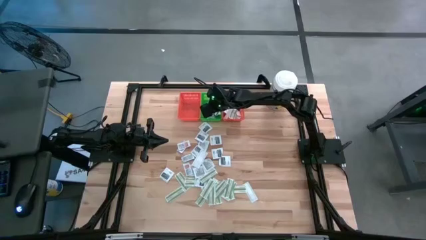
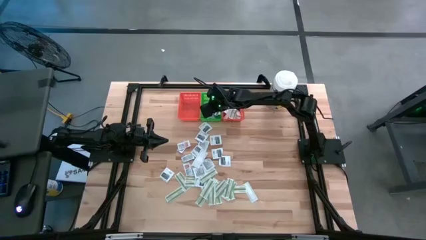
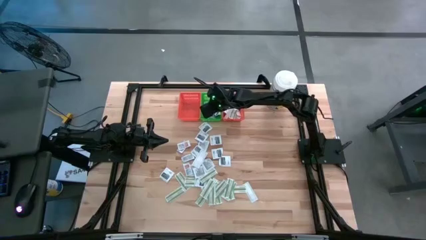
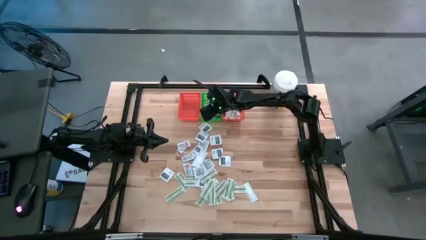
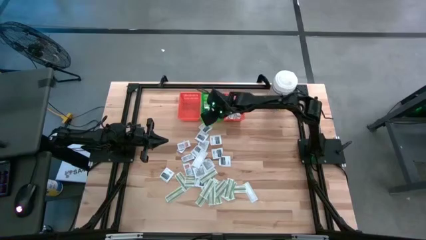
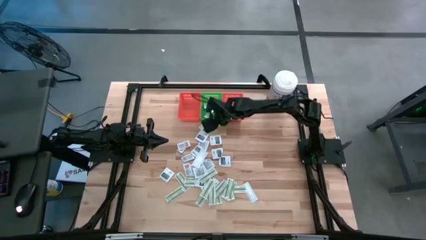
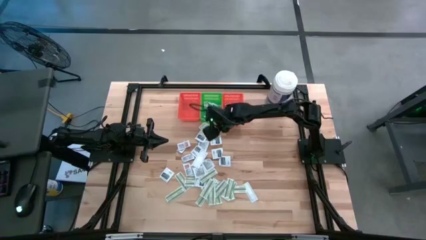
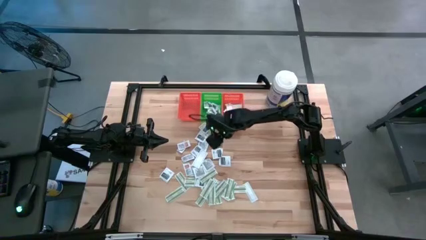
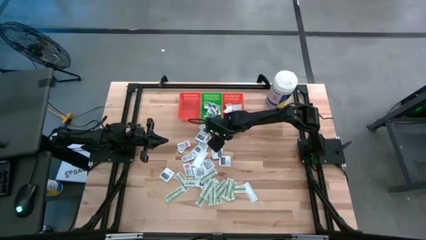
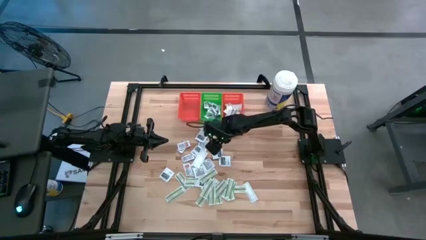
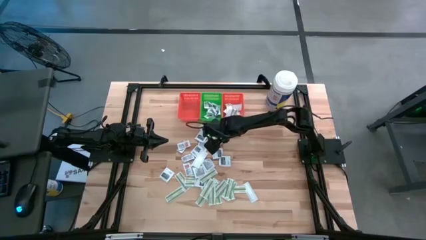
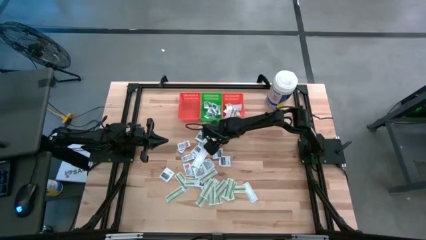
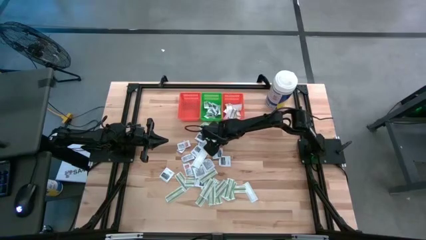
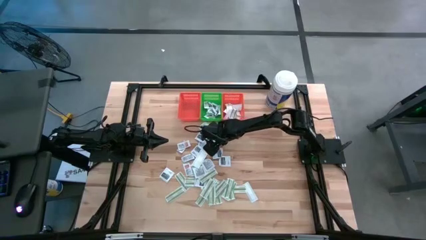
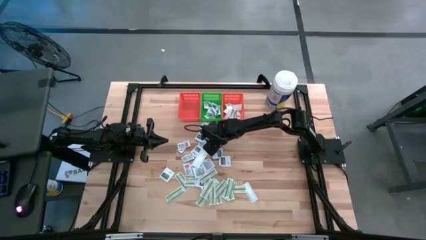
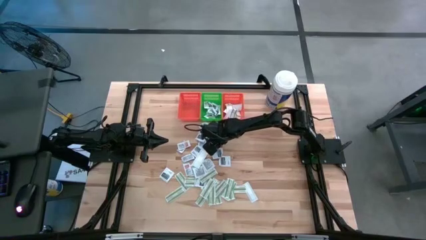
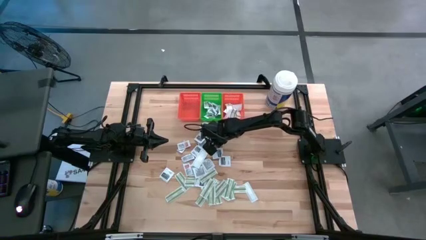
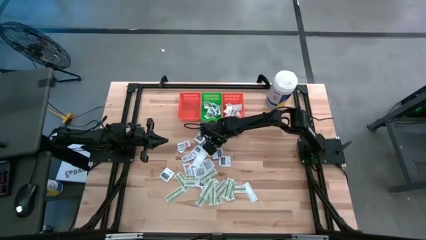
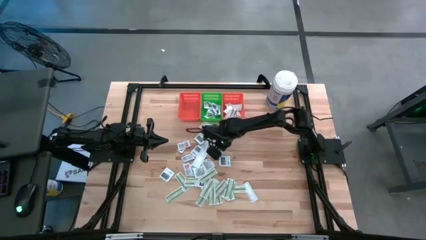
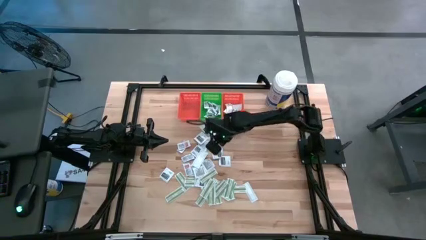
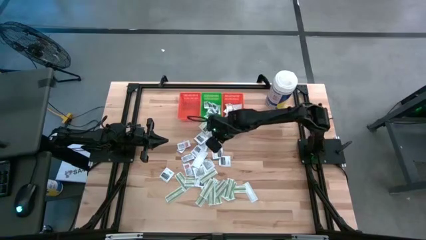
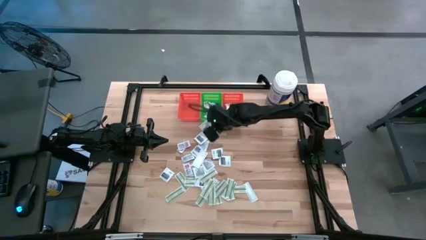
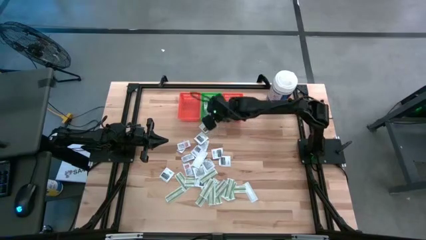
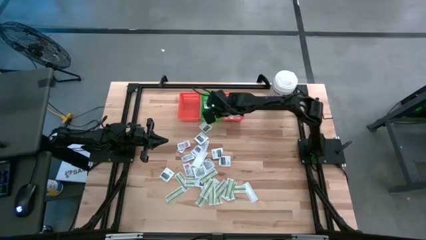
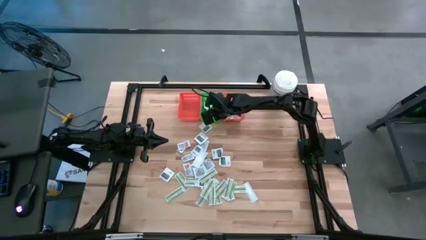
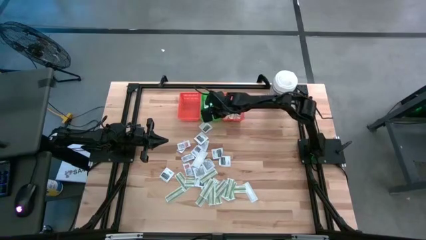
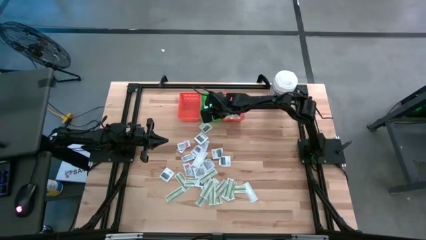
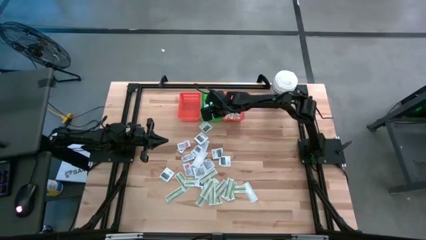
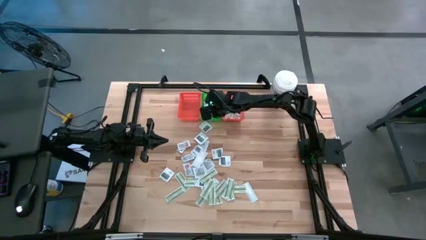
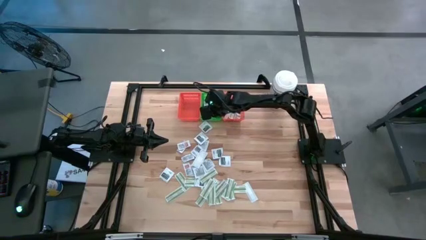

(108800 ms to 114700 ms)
Task: Pick & Place First Aid Supplies
Put the towelette pack into the green bin

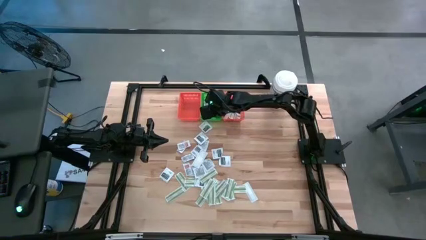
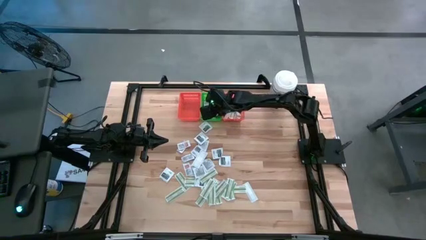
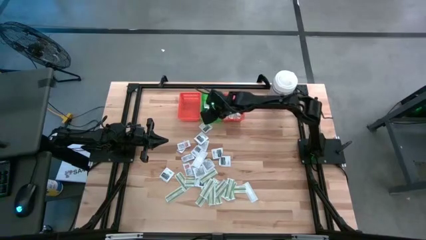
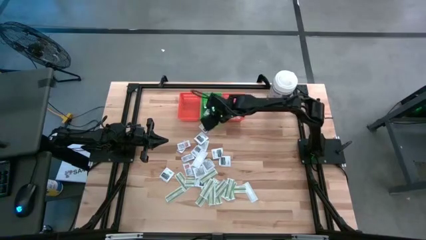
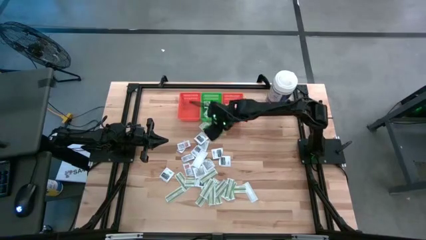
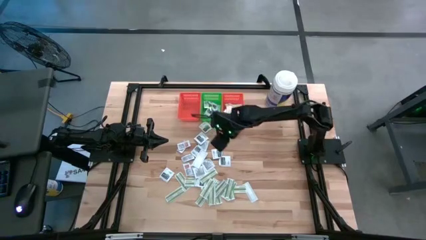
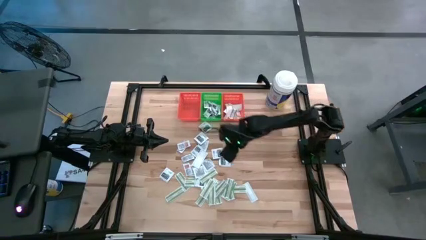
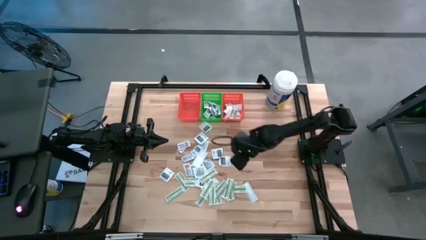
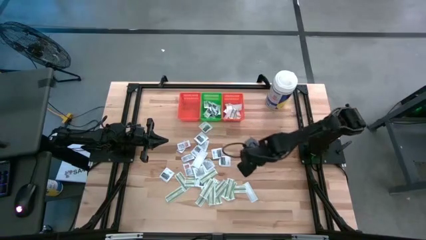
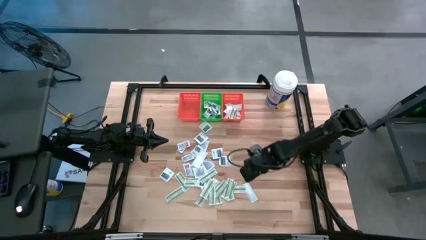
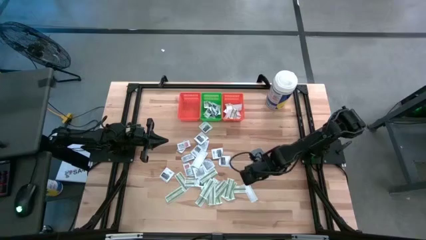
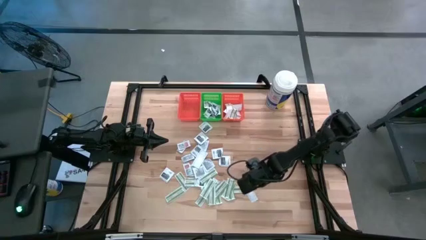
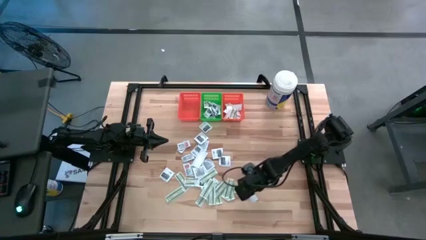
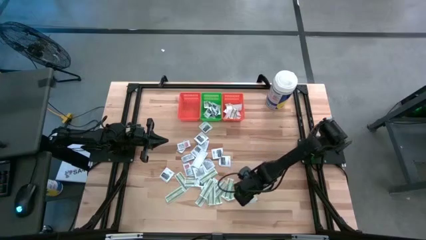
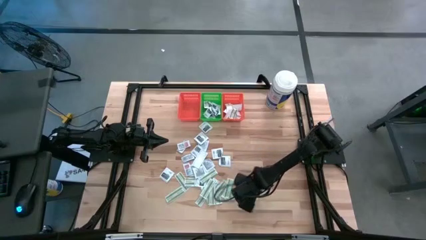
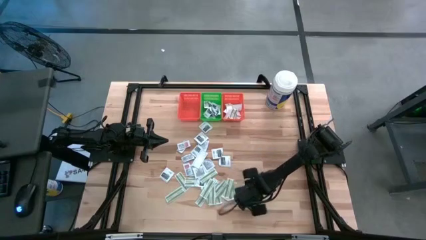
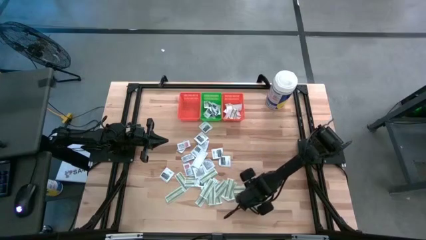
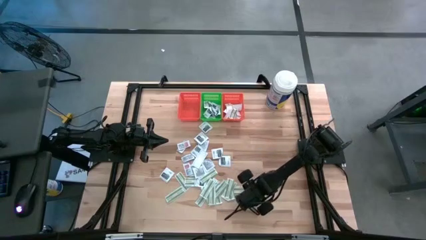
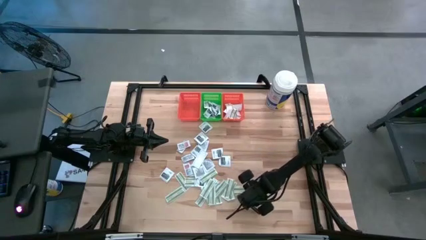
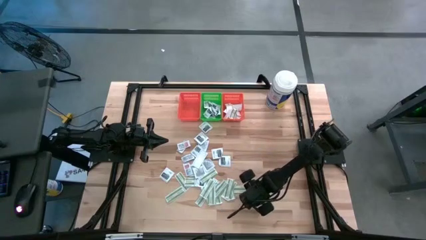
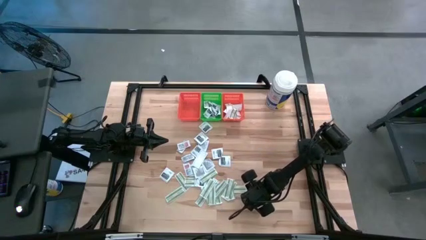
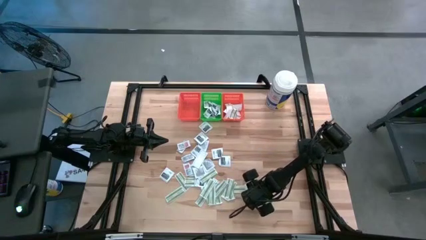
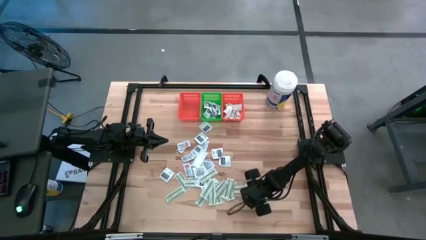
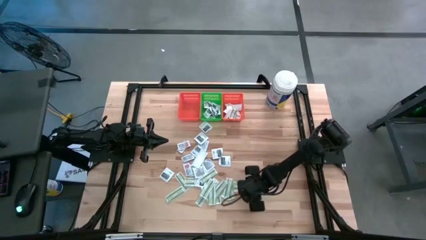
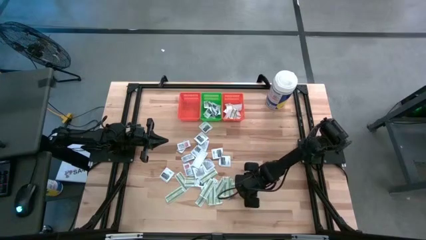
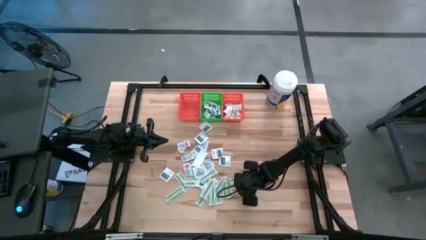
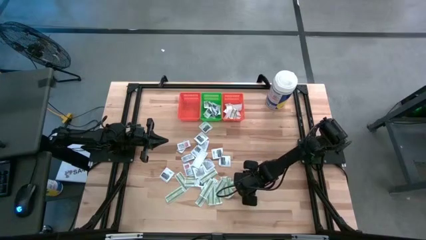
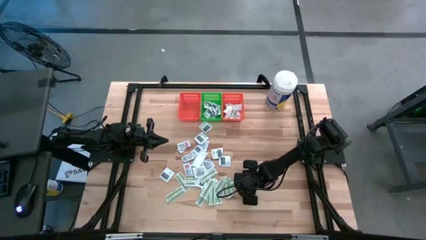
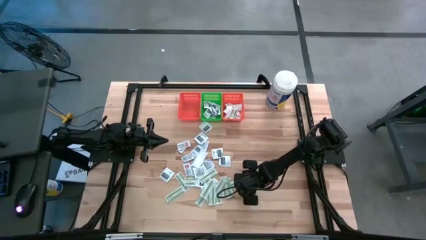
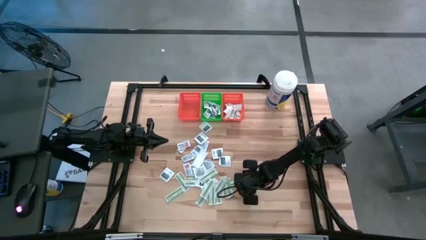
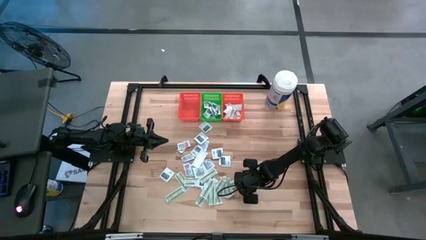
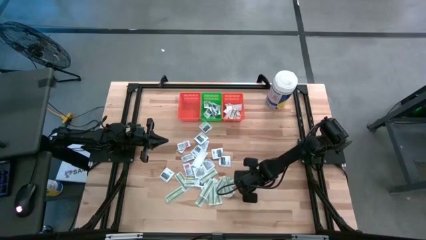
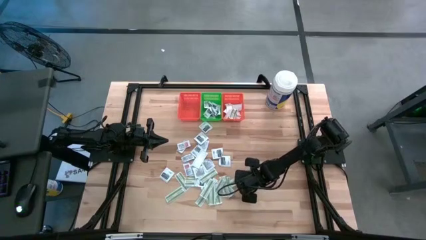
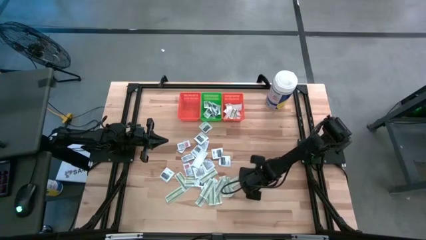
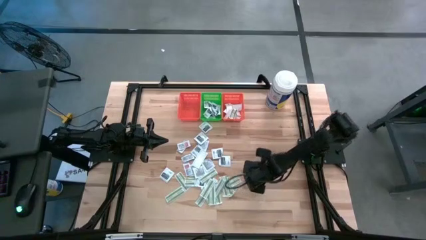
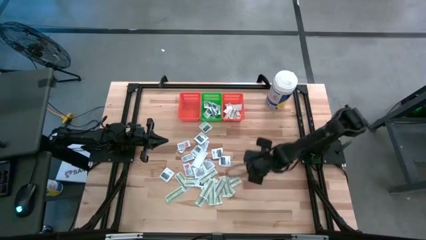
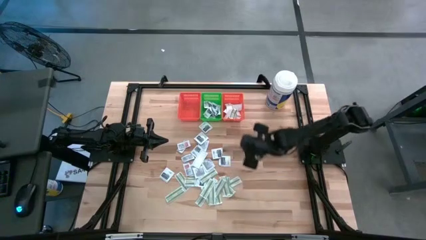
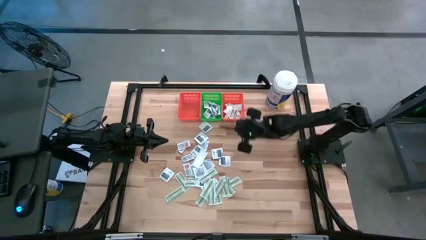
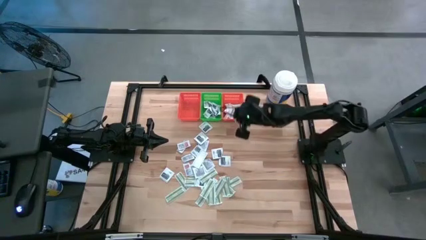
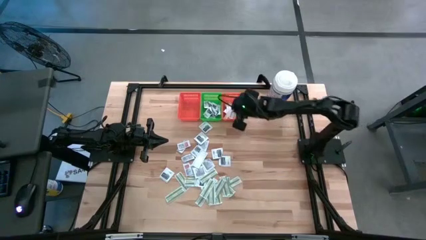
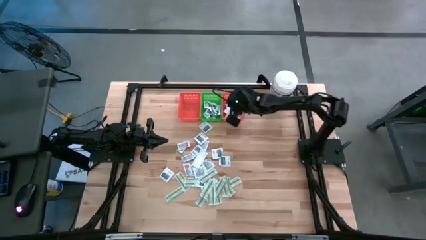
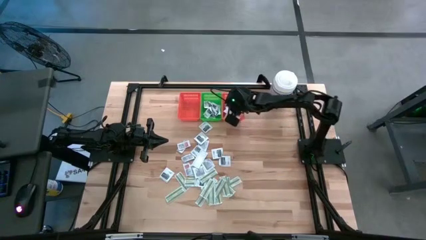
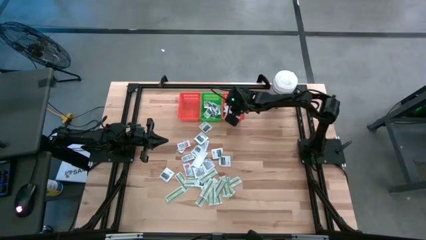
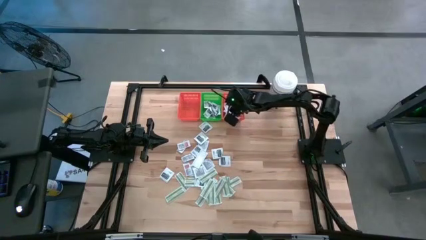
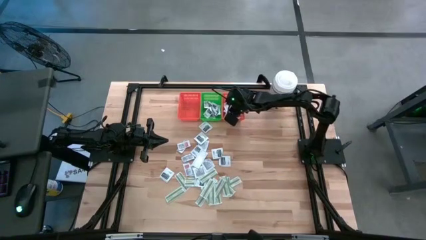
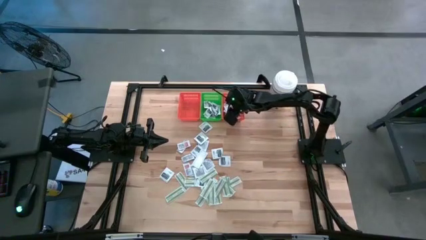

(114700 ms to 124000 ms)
Put the bandage pack into the right orange bin
